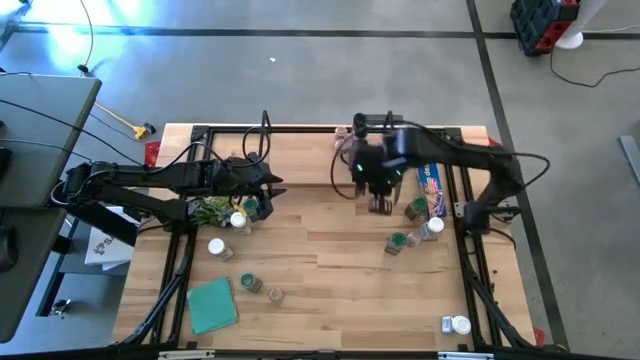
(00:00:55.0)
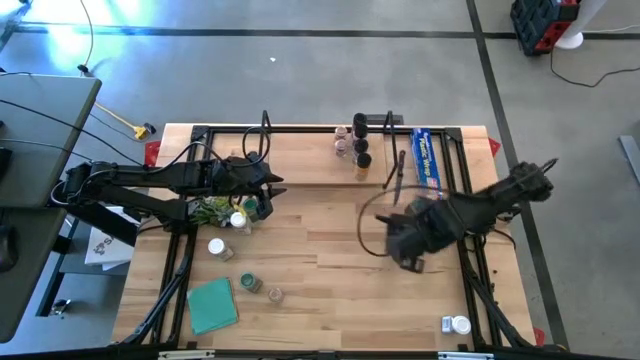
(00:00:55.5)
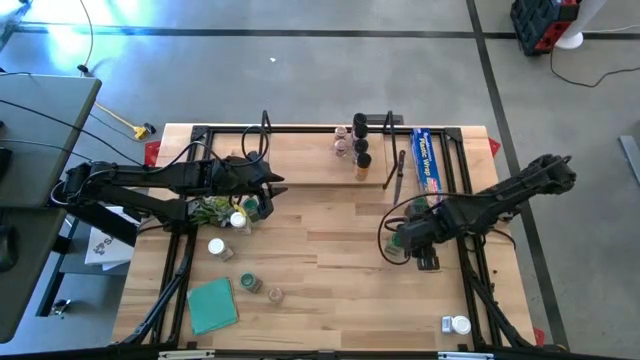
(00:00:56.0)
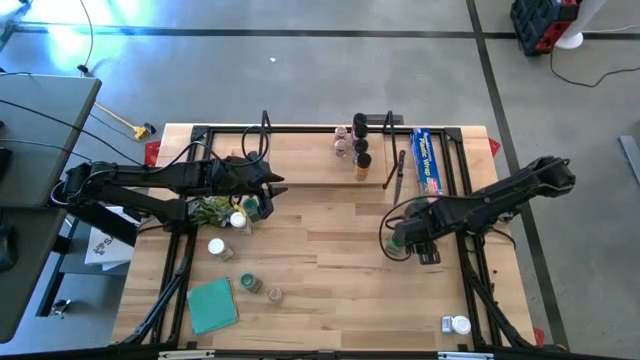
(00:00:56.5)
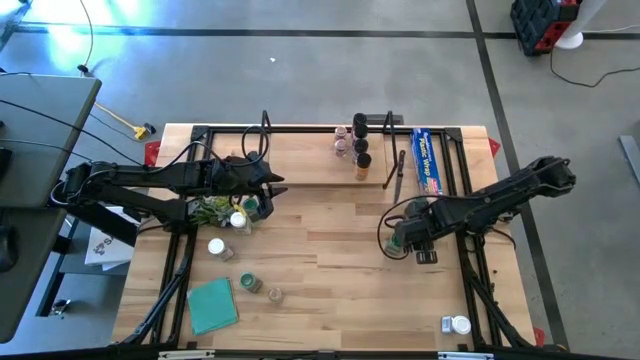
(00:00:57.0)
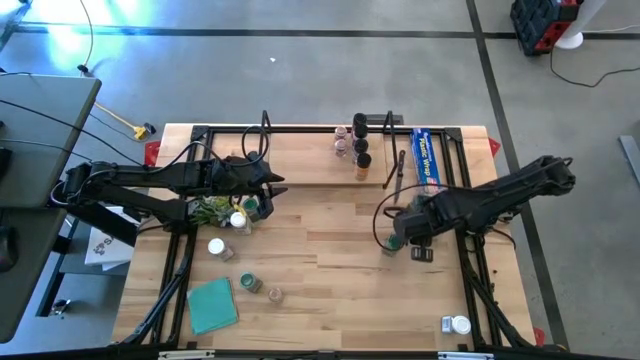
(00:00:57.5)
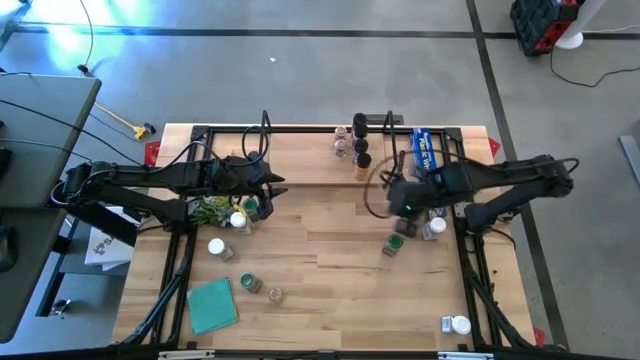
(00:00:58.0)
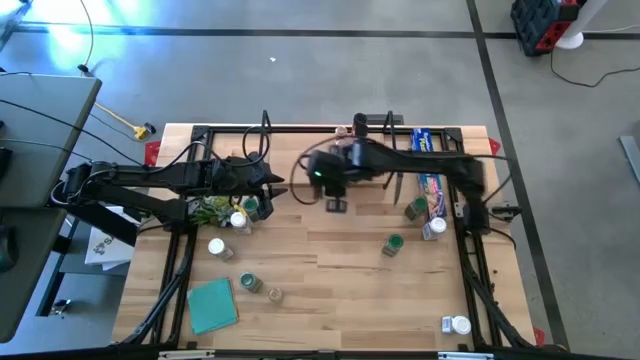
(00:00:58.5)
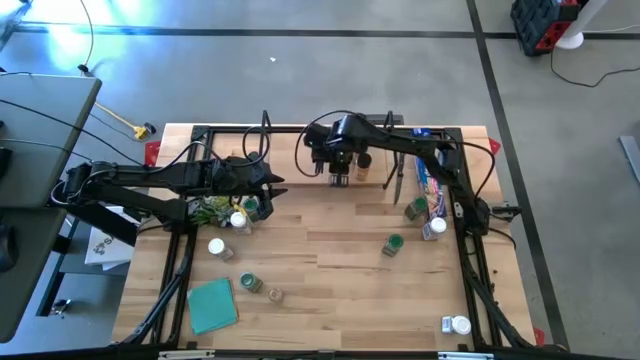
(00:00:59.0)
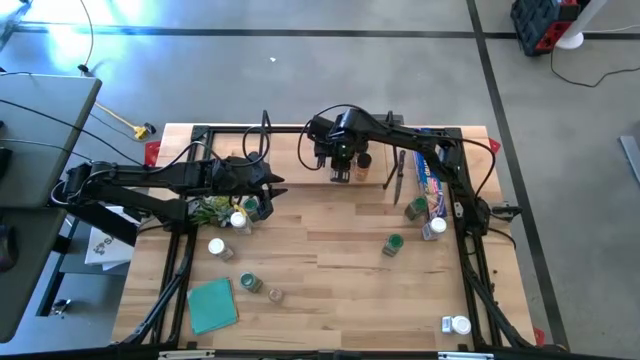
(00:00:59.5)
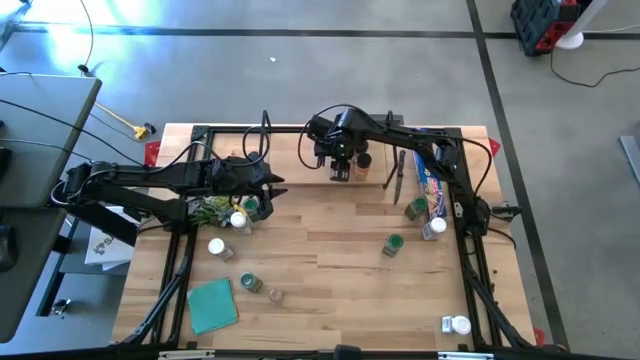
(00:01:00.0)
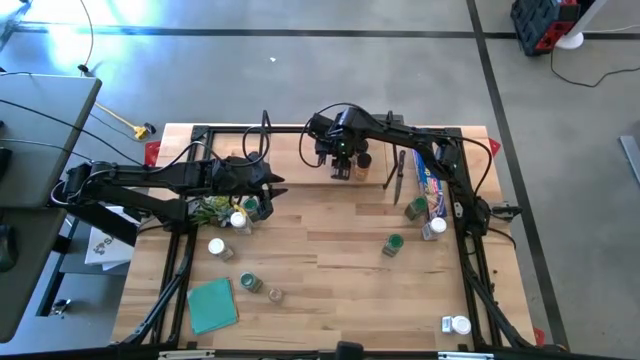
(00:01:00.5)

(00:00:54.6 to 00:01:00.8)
Task: Shelf spices
Put the brown seasoning bottle on the shelf align with the other brown seasoning bottle

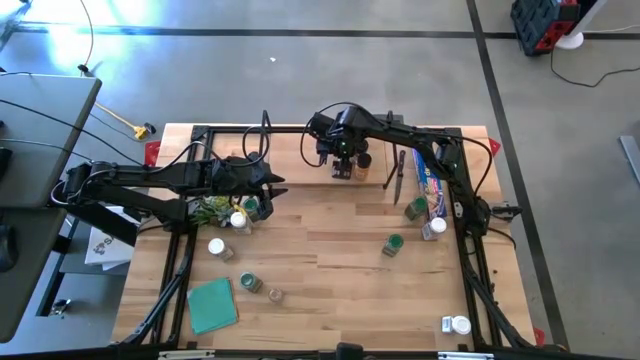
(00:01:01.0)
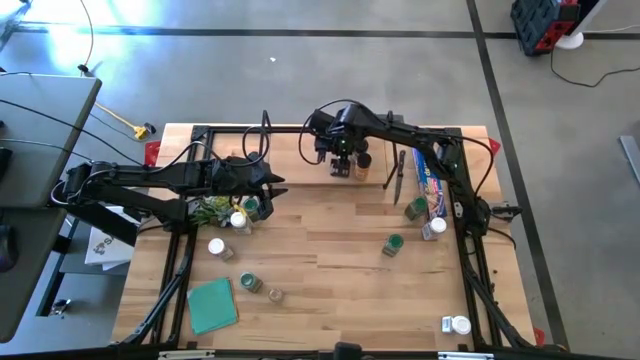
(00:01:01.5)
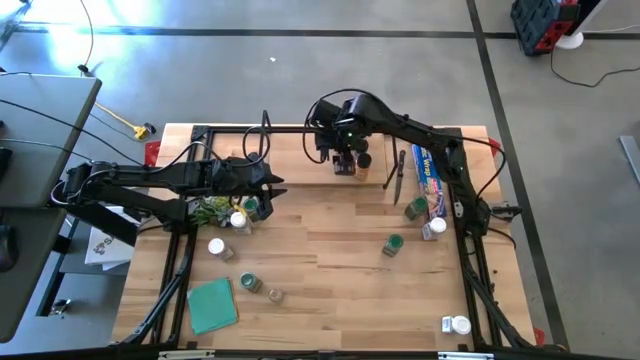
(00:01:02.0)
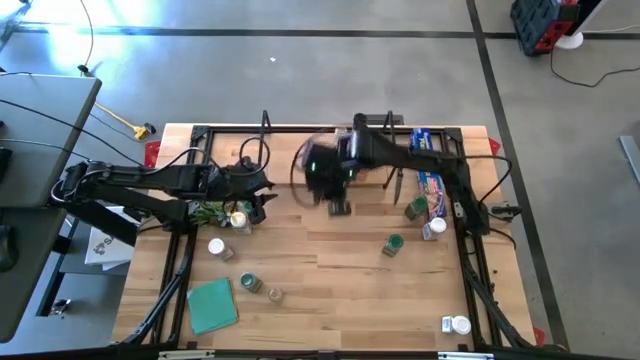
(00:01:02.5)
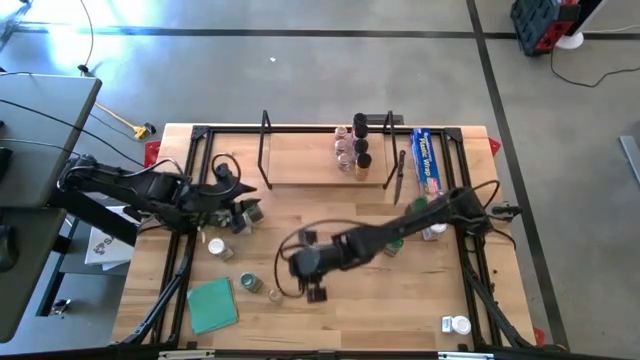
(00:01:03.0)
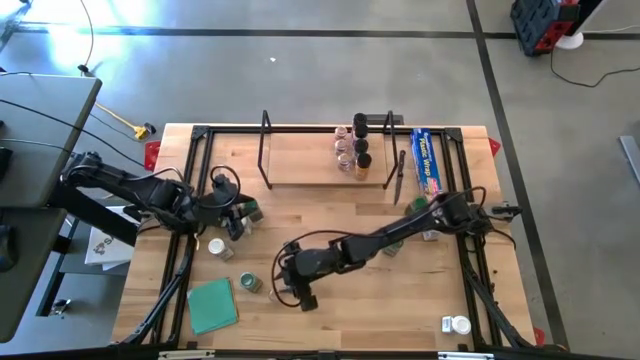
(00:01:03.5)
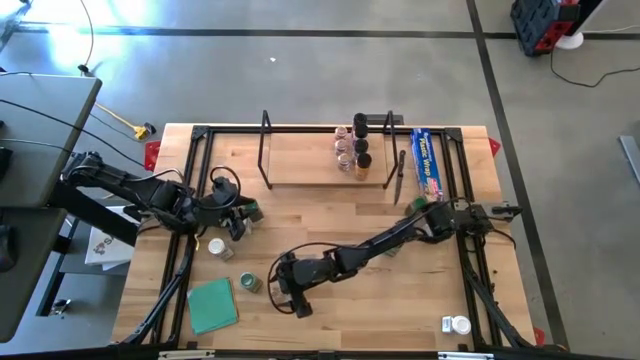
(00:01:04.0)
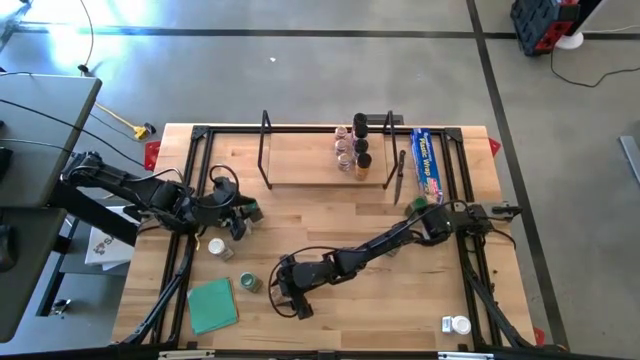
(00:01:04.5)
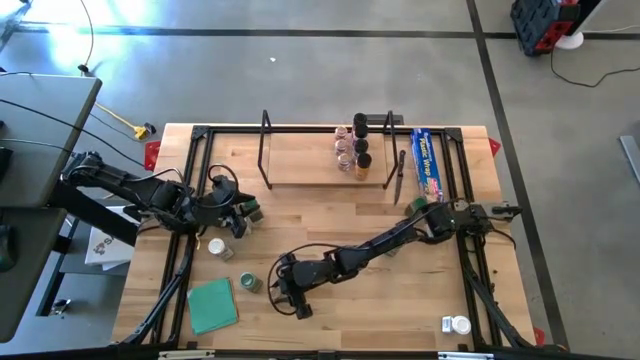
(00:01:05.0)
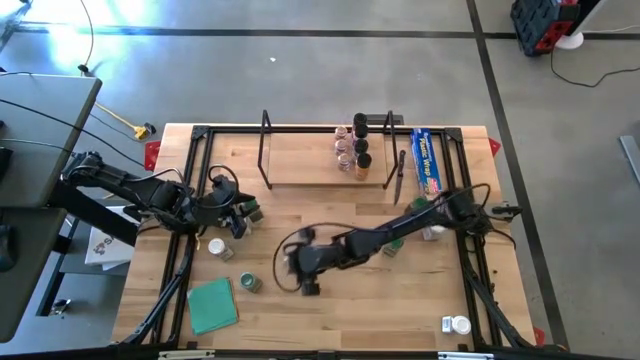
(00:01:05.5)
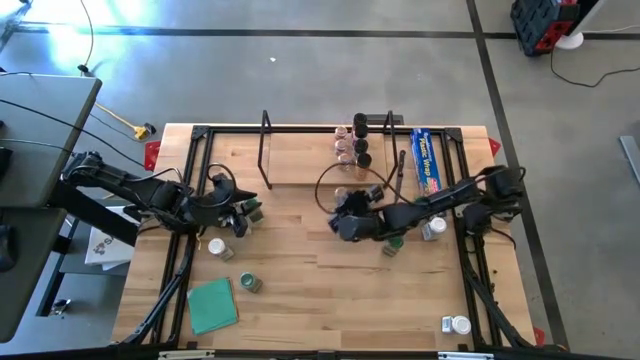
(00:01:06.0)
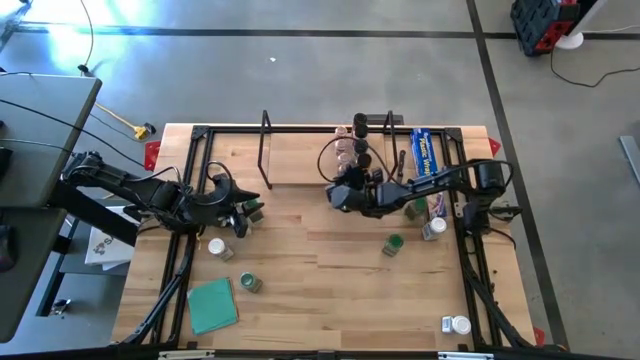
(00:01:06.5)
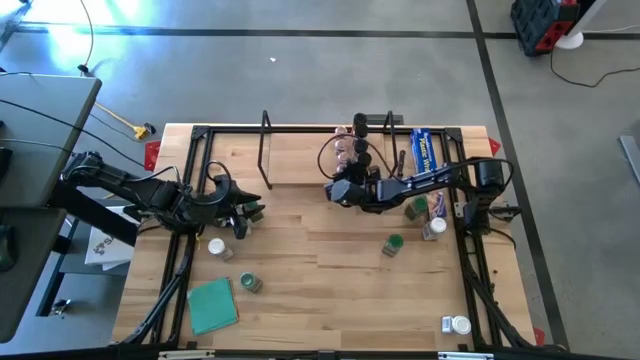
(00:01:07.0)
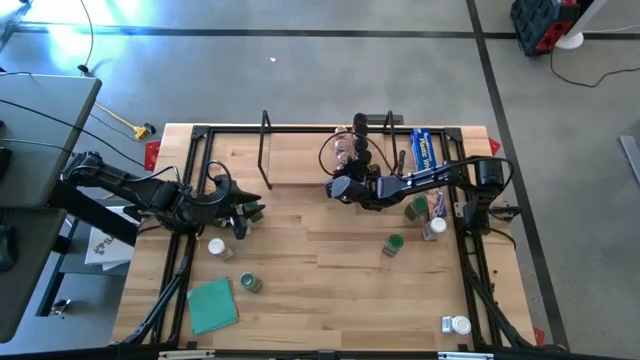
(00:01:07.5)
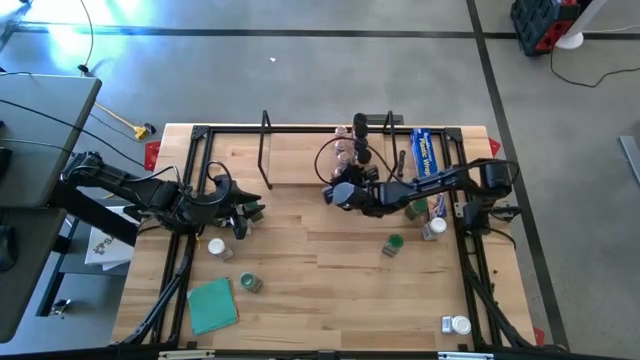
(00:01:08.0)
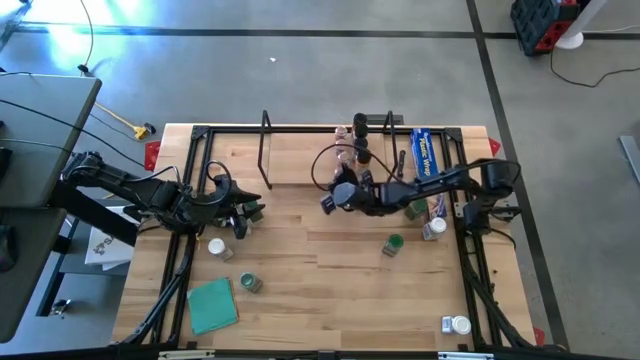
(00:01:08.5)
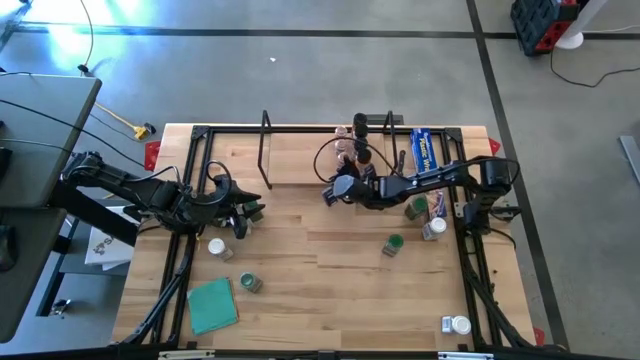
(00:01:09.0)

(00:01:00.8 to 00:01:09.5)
Put the brown seasoning bottle on the shelf align with the other brown seasoning bottle

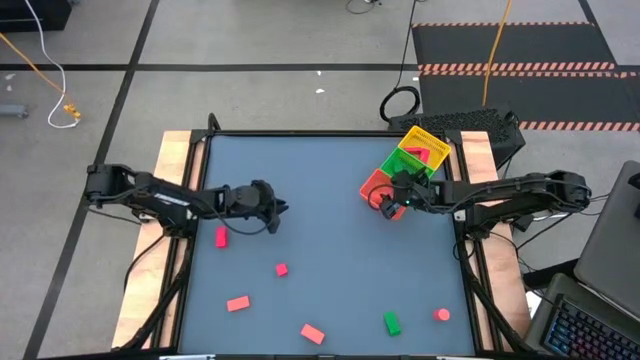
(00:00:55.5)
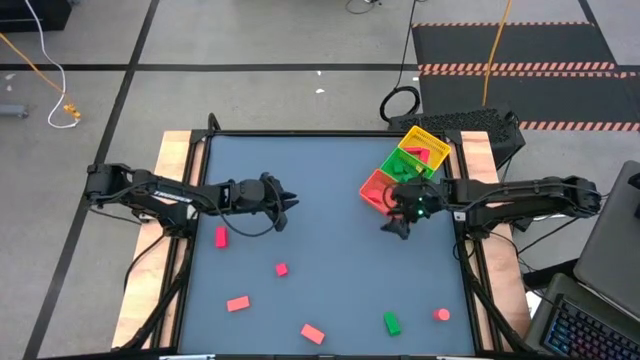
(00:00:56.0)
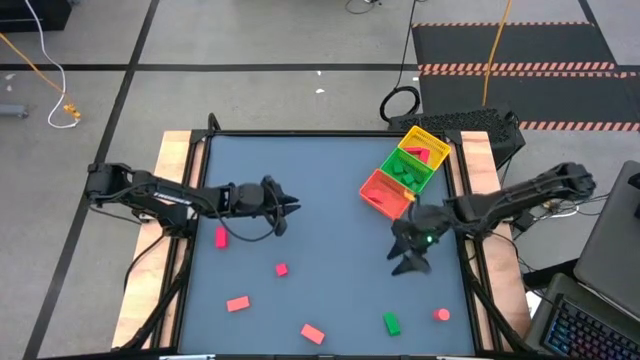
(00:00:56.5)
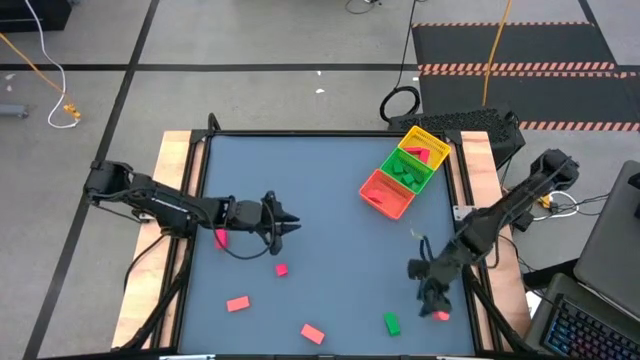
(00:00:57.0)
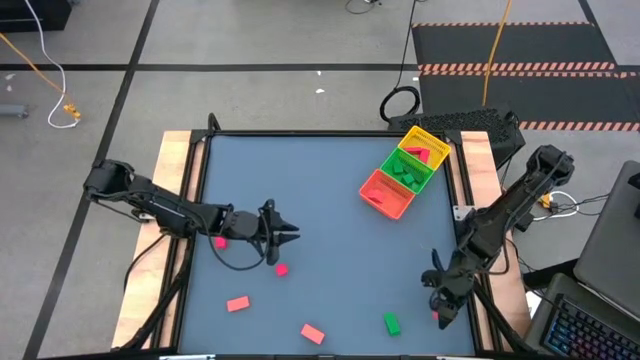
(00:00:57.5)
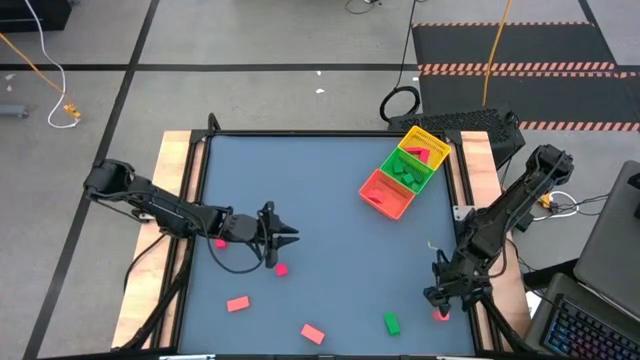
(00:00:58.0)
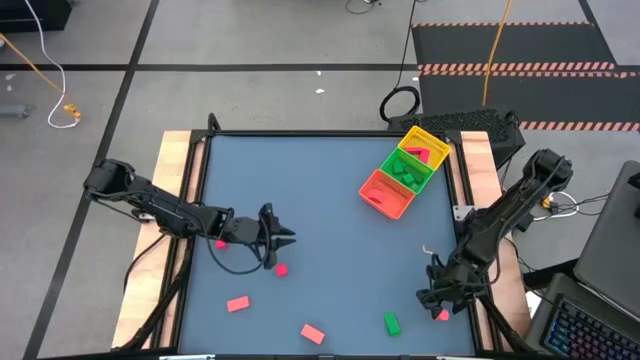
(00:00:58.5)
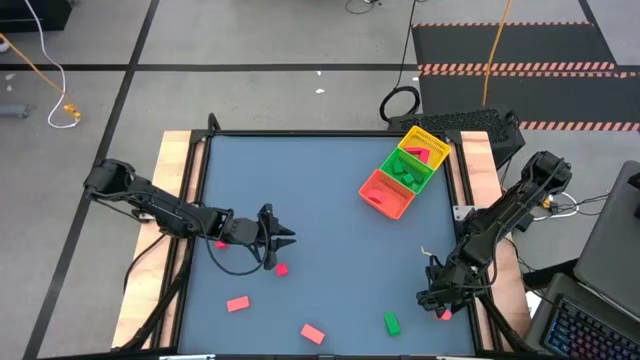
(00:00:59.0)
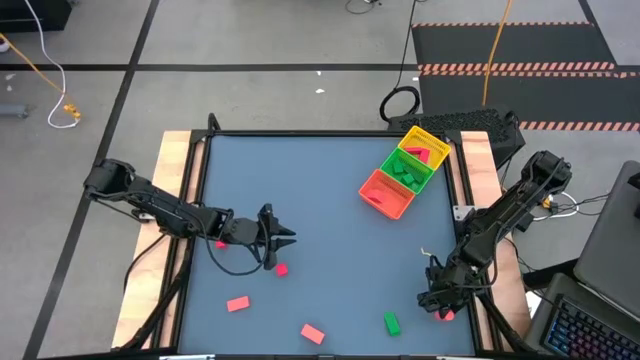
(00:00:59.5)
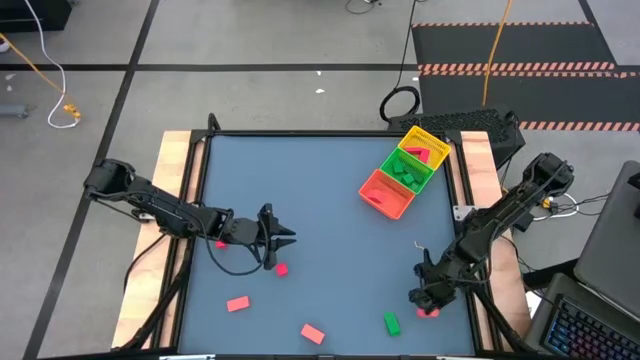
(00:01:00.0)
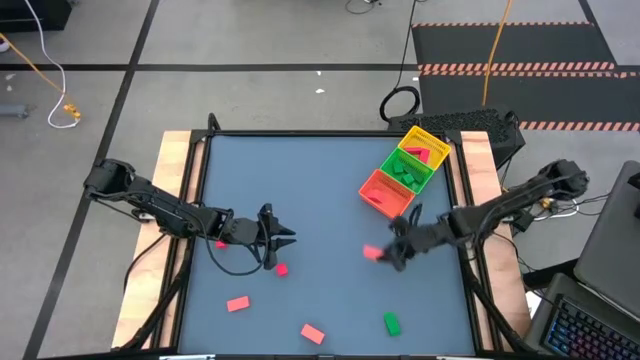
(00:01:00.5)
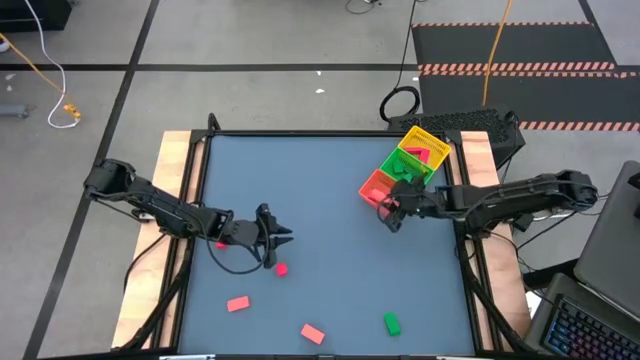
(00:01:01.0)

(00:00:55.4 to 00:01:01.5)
Task: Sort & place blocks by color
Put the orange block into the orange bin
